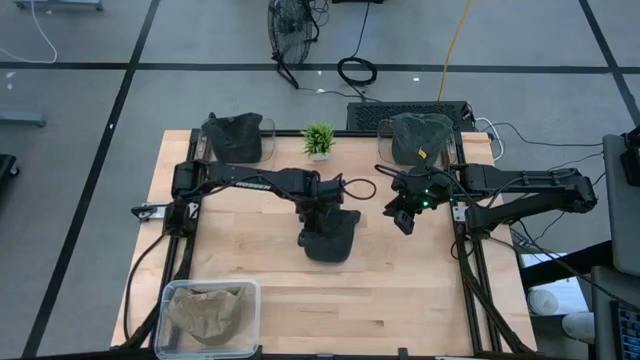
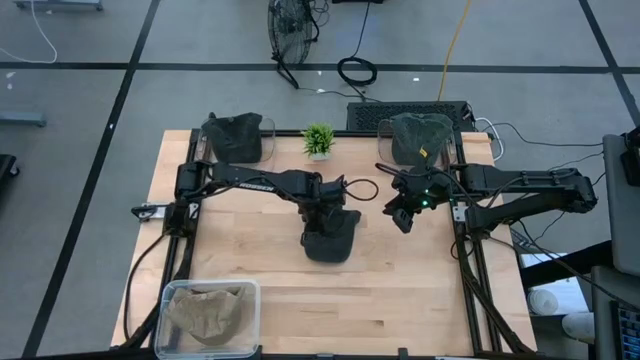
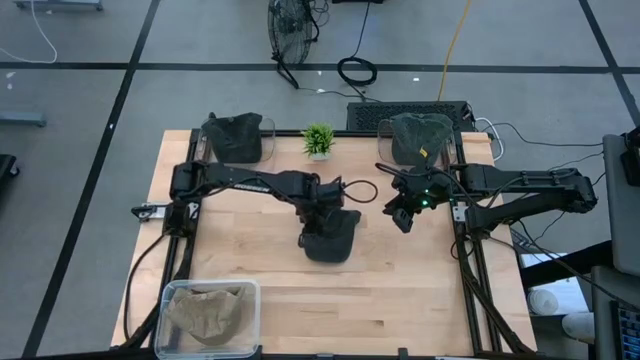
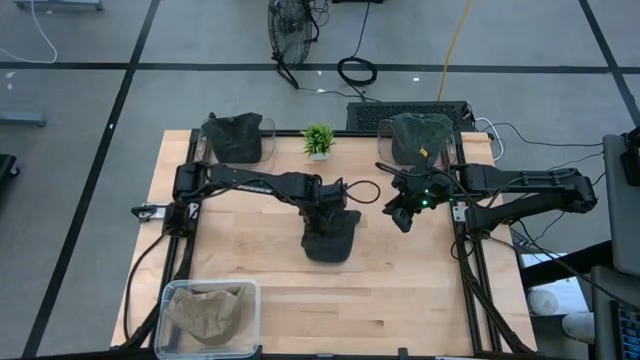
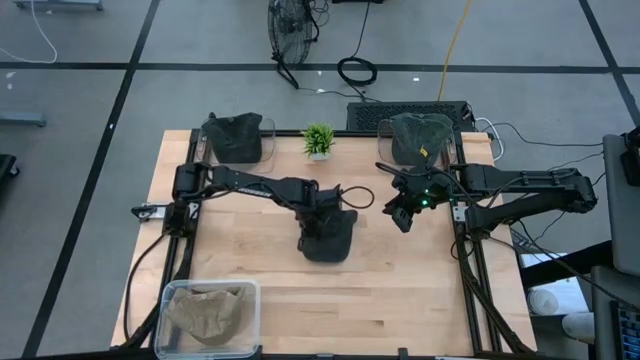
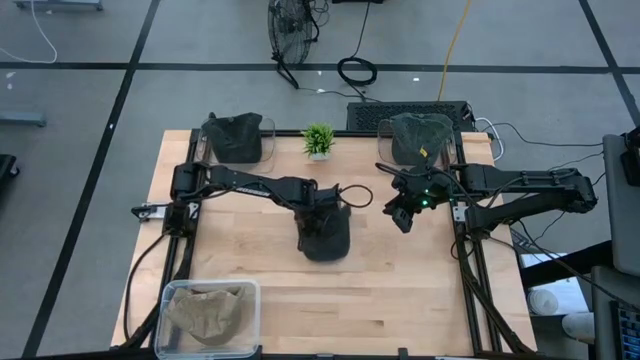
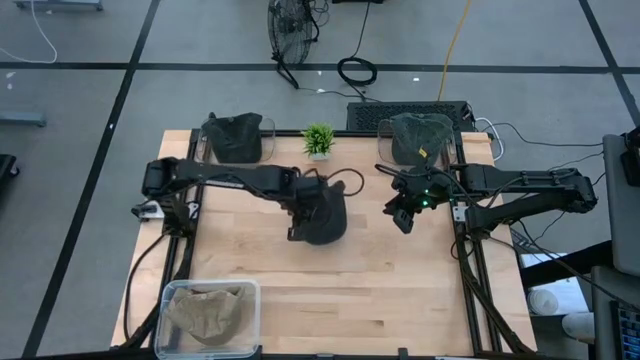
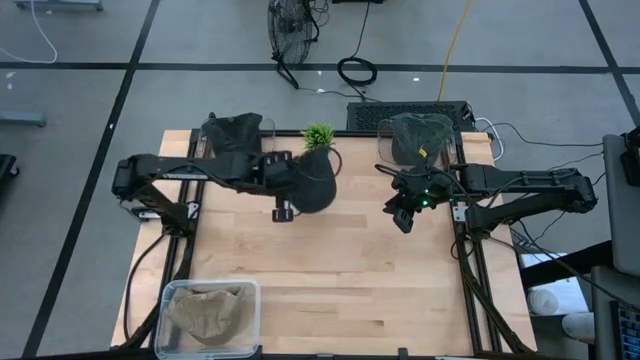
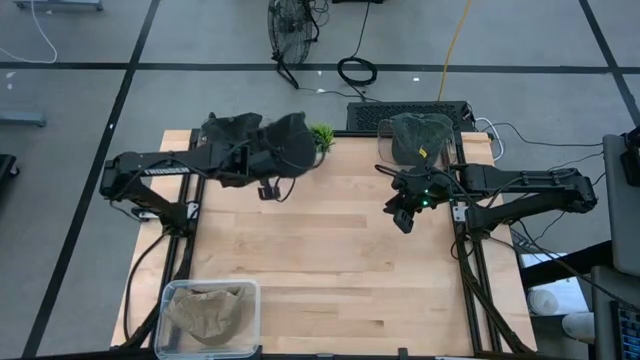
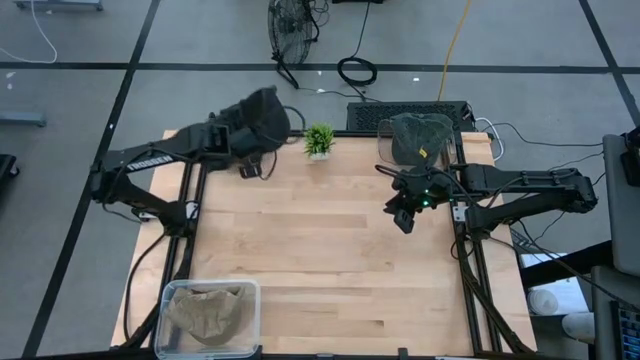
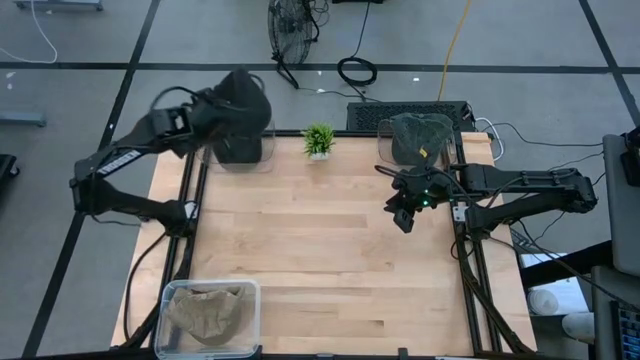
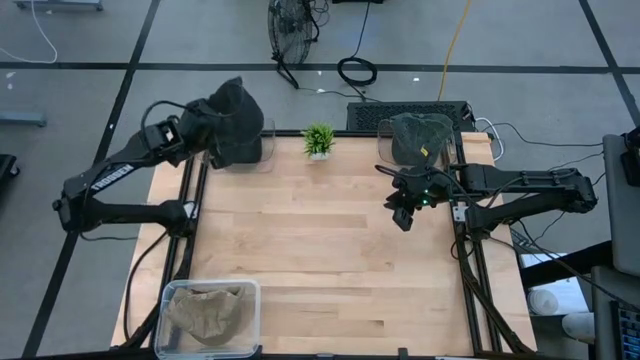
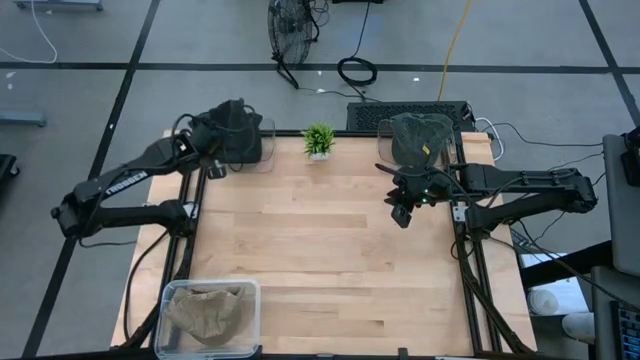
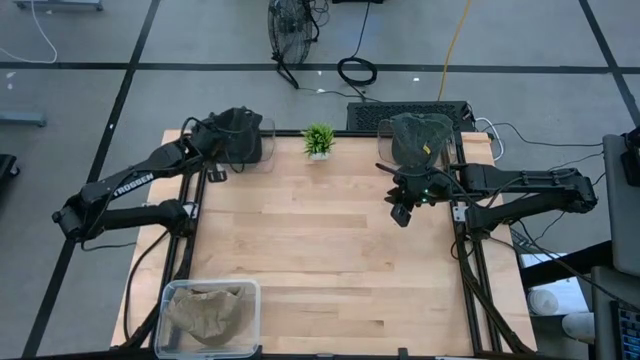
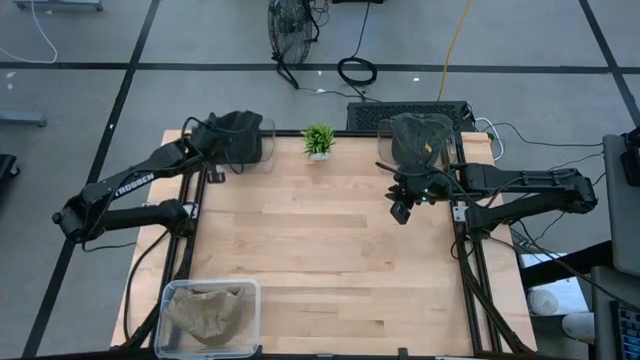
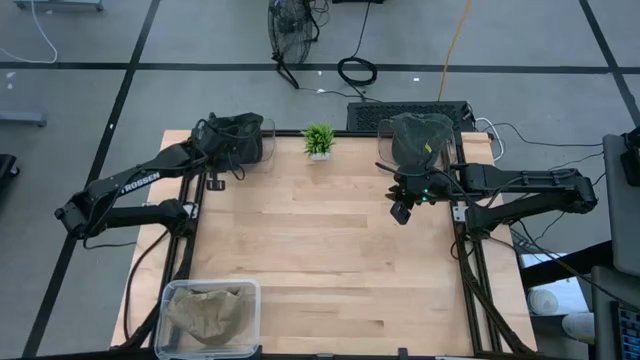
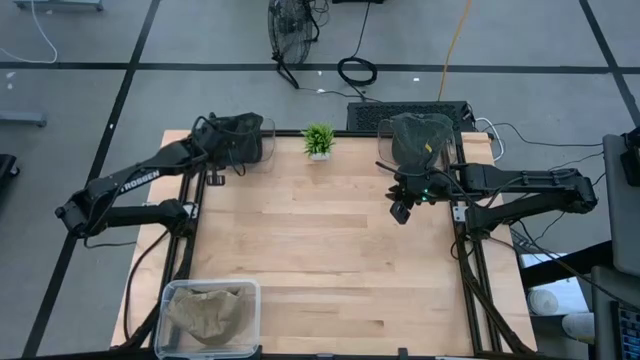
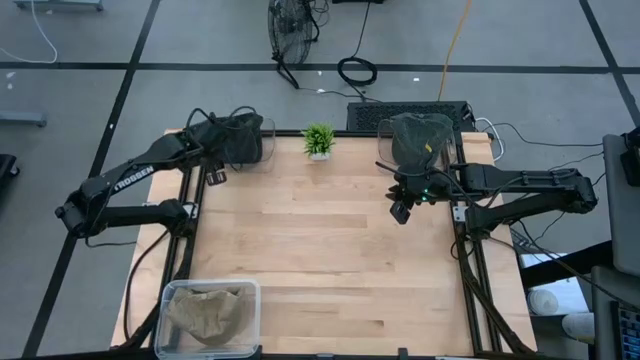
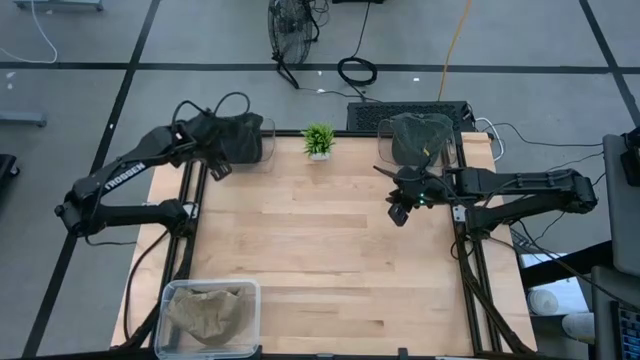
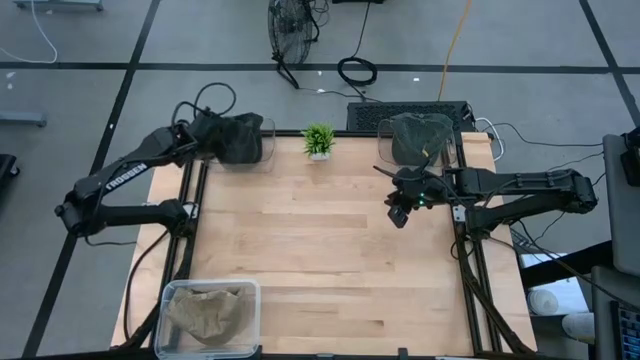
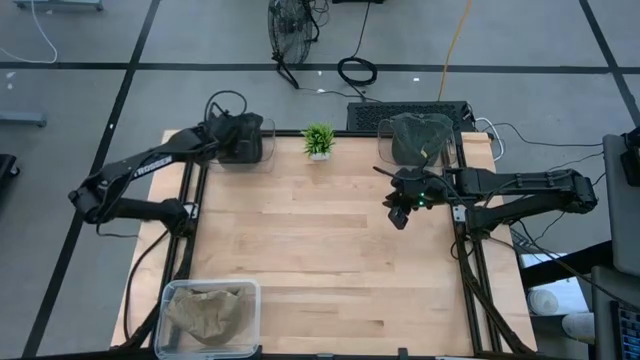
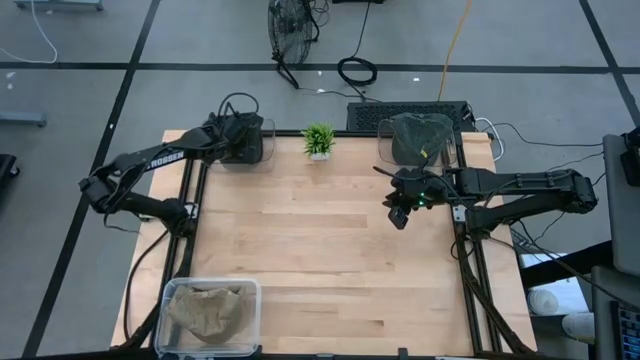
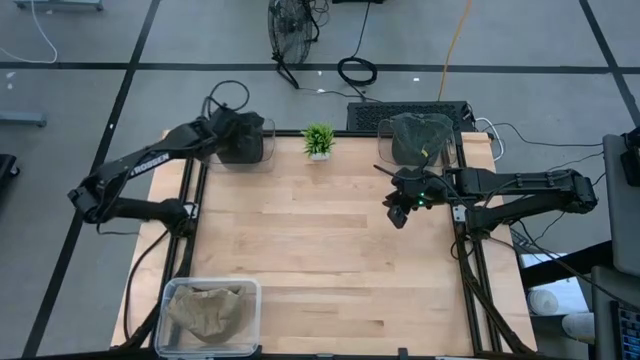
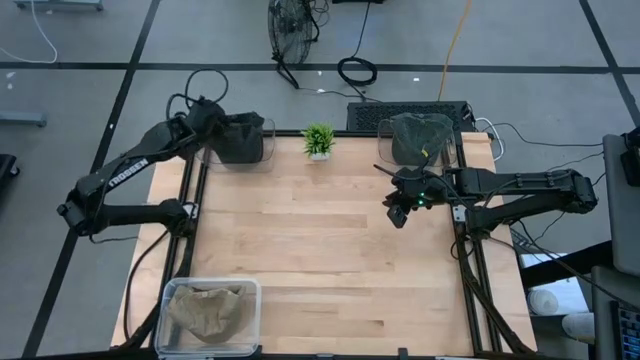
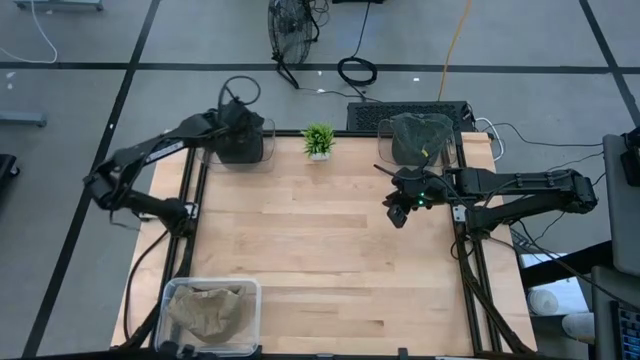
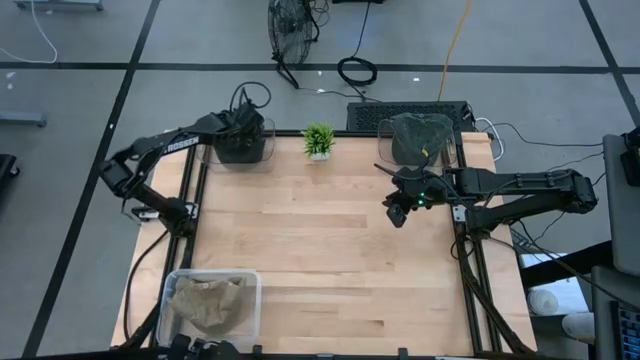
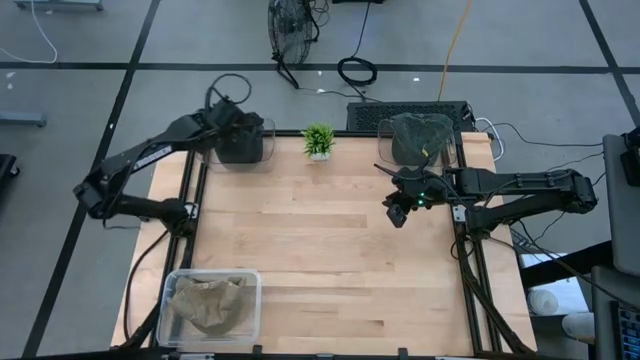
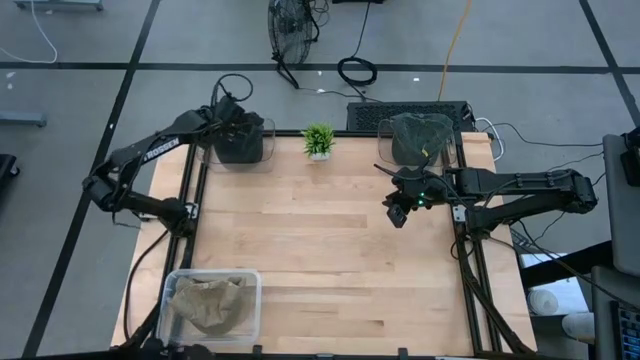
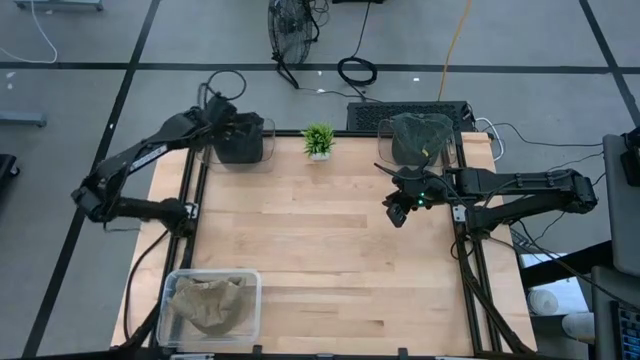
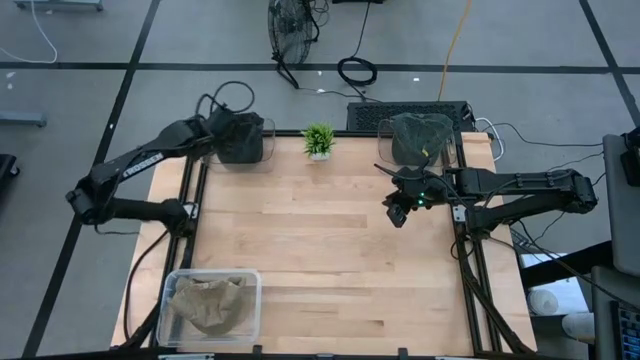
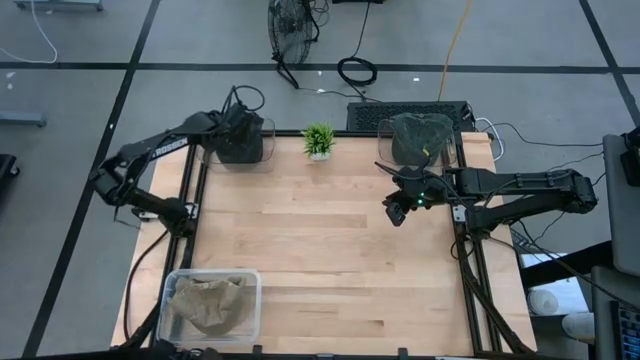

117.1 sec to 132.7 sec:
Task: Pick & Place hat
Put the black cap into the left transparent bin

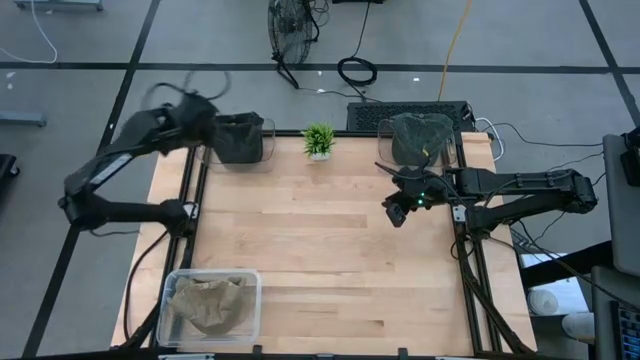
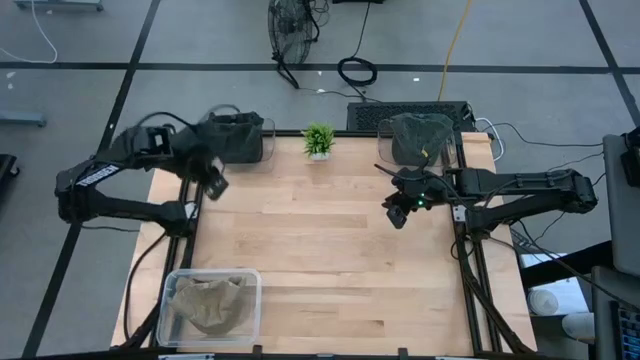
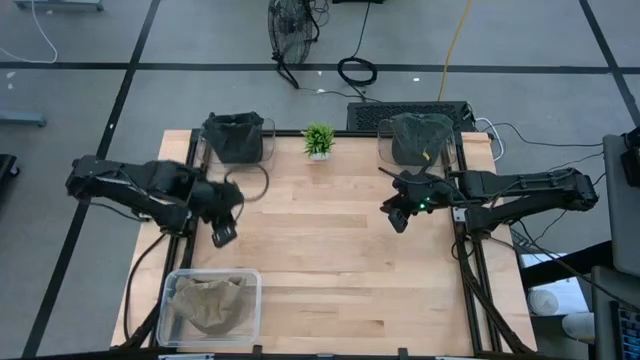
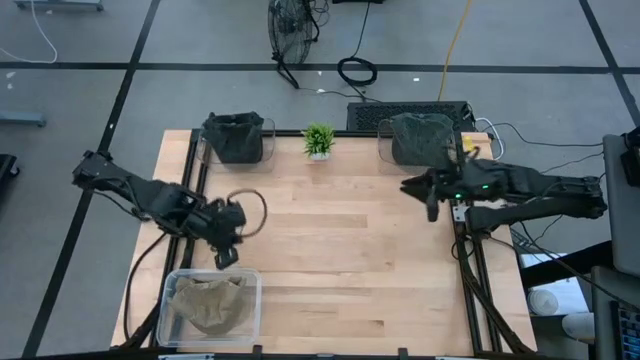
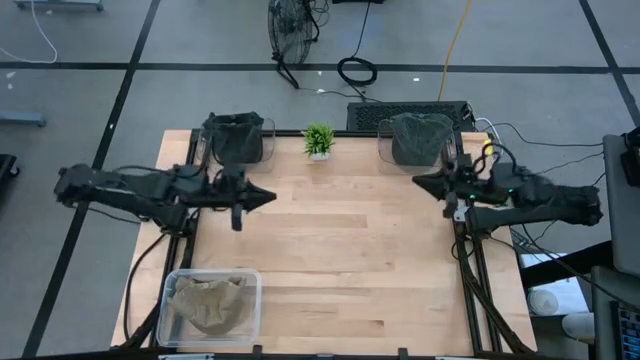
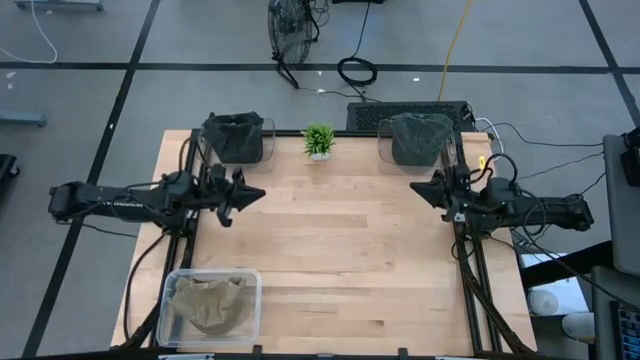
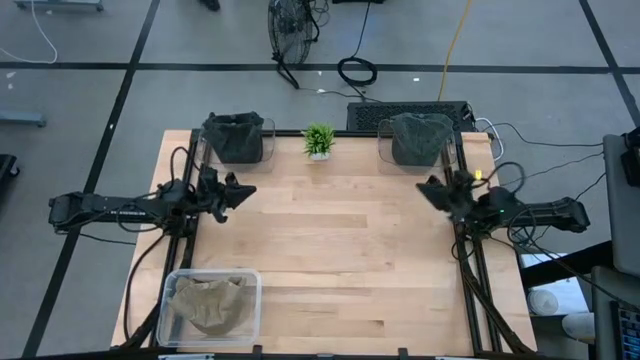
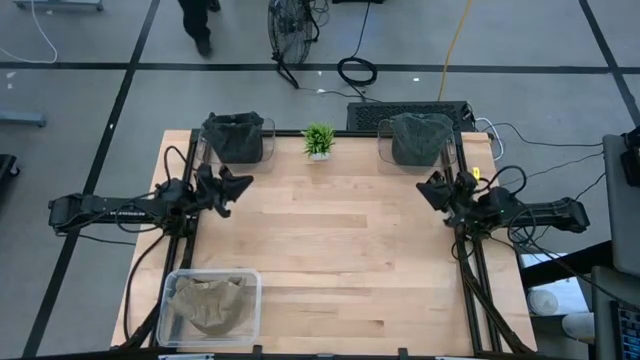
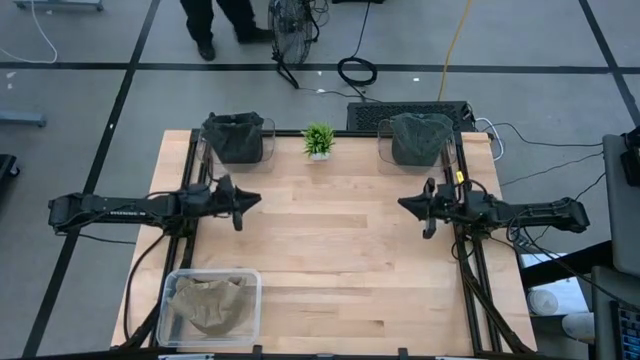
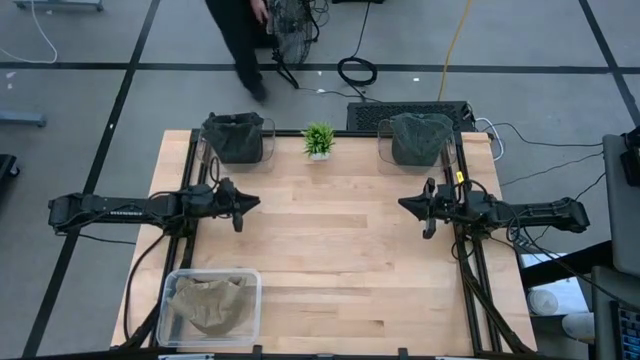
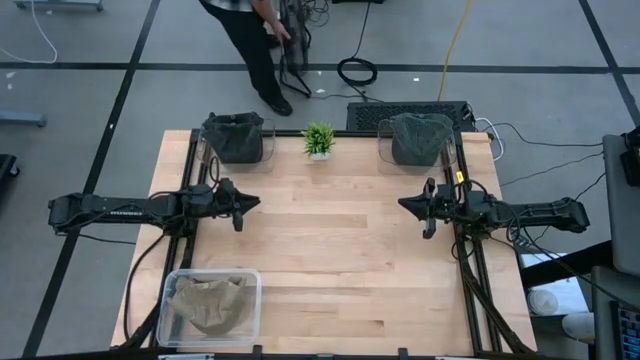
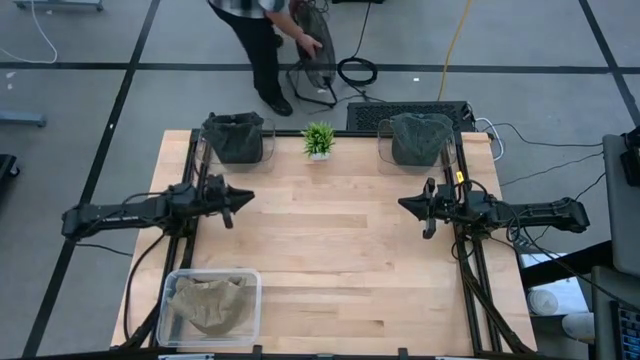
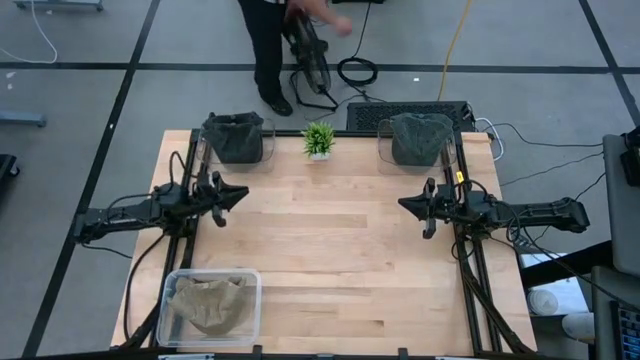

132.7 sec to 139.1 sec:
Return to Home Position
